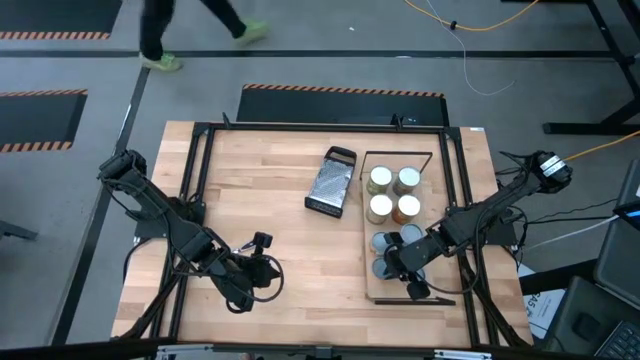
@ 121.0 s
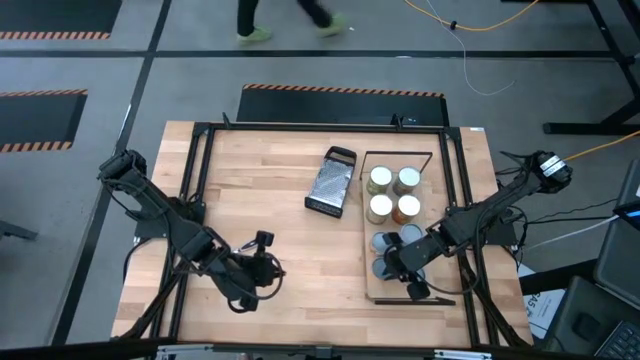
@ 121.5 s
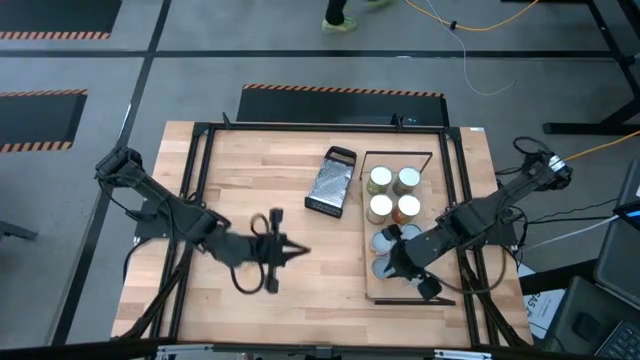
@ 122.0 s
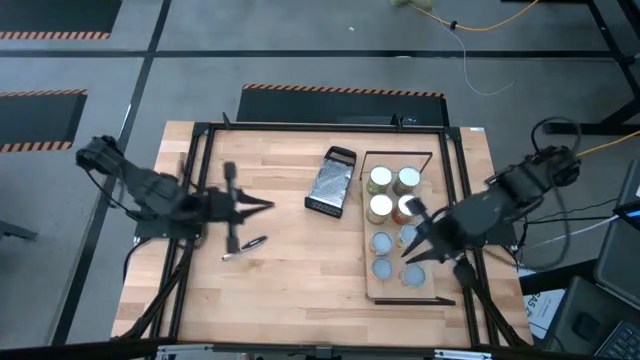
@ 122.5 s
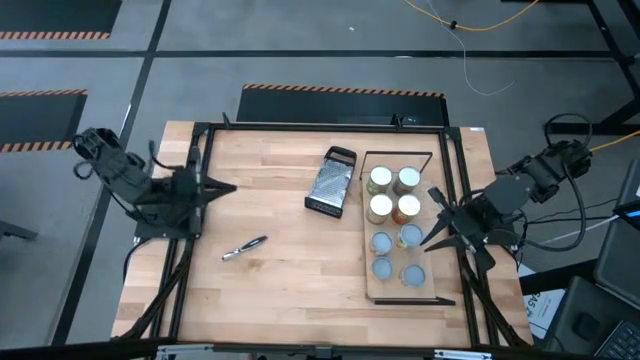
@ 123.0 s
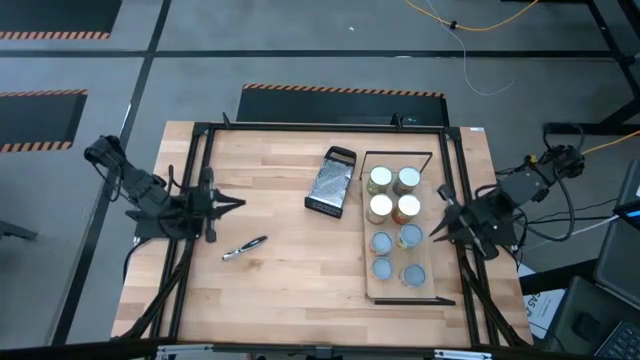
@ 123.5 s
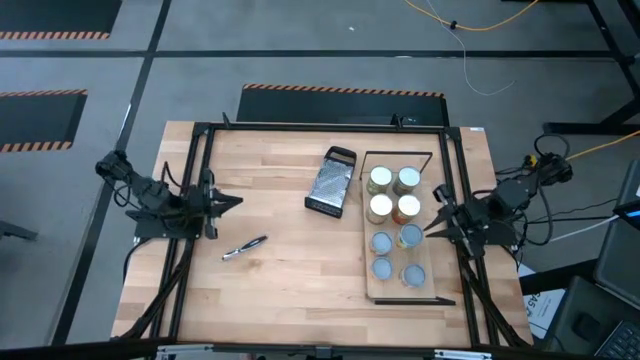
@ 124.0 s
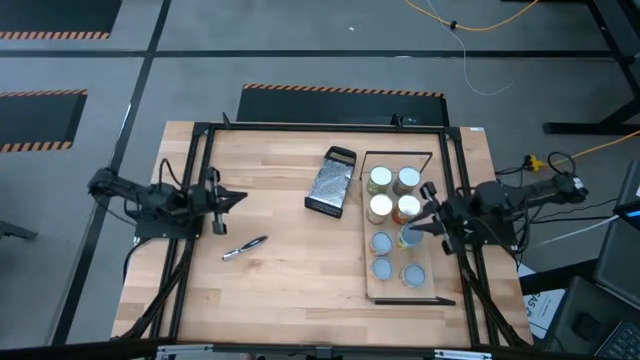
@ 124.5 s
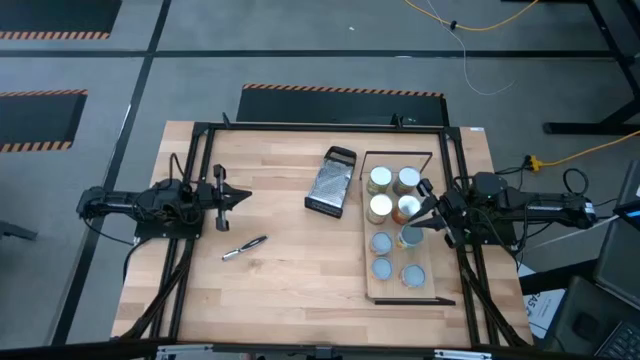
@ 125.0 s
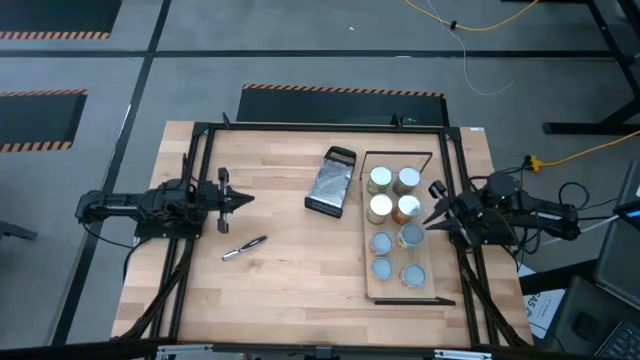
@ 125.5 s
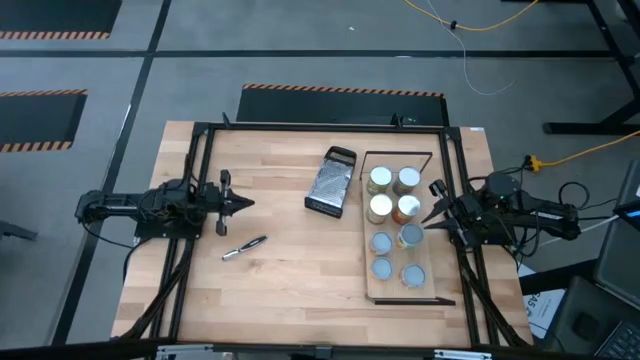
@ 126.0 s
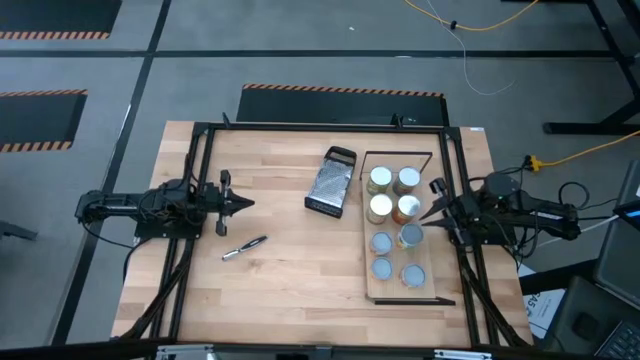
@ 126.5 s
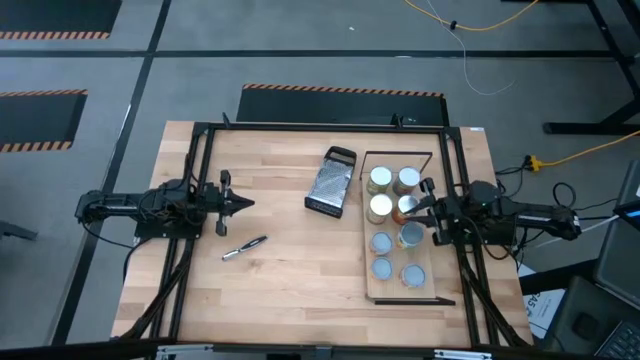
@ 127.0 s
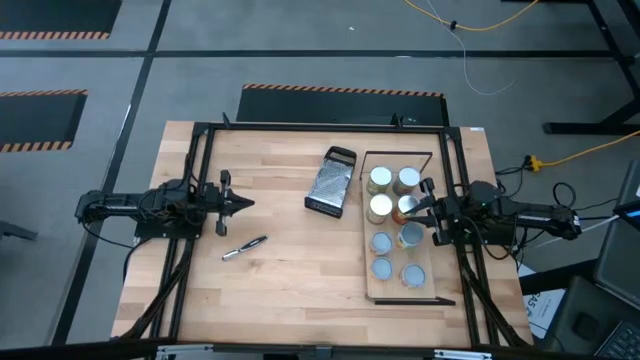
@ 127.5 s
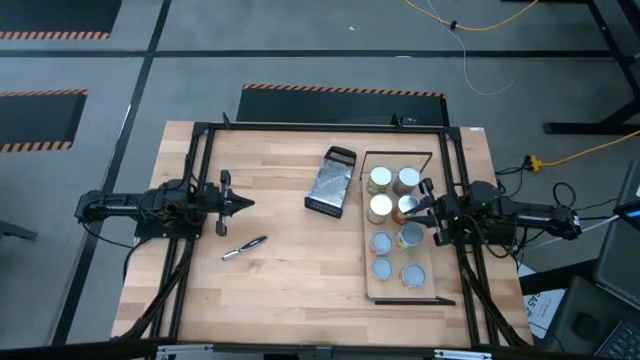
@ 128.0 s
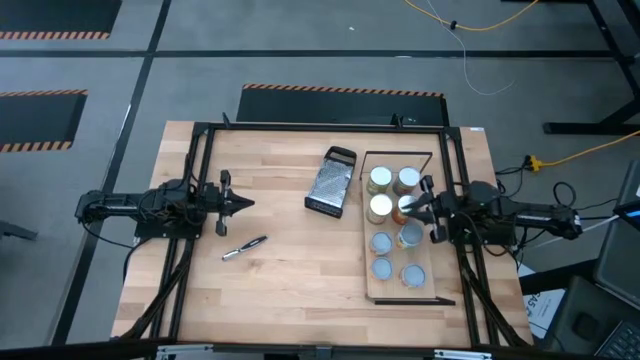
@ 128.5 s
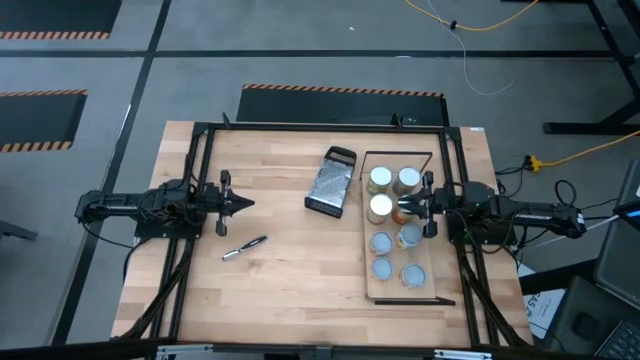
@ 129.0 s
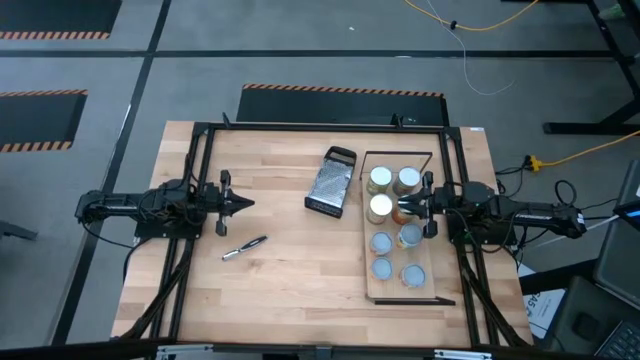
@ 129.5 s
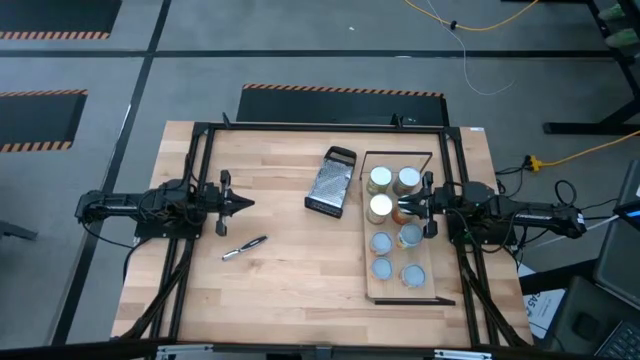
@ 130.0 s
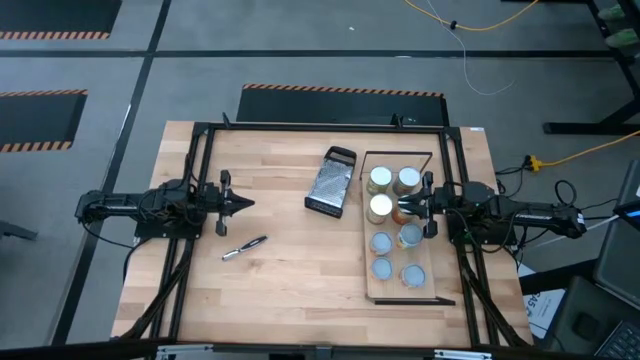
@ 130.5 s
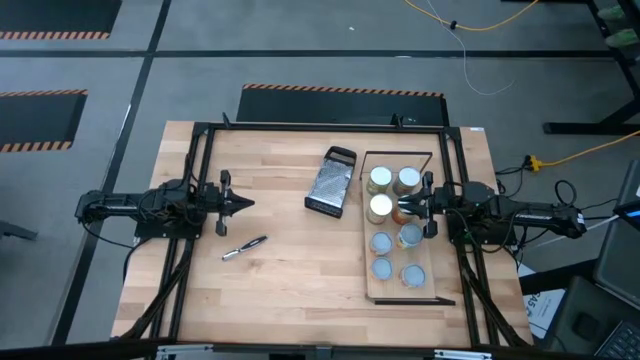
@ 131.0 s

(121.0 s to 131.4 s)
Task: Pick and place cans onto a shelf
Return to Home Position

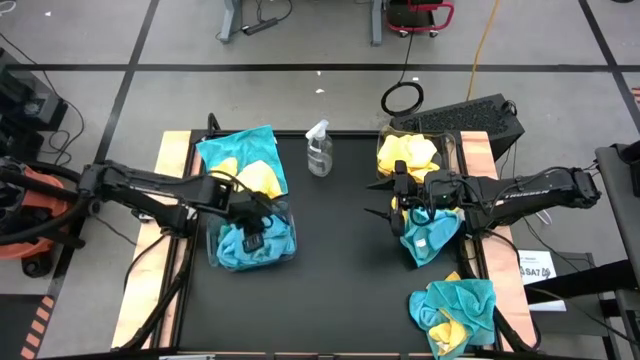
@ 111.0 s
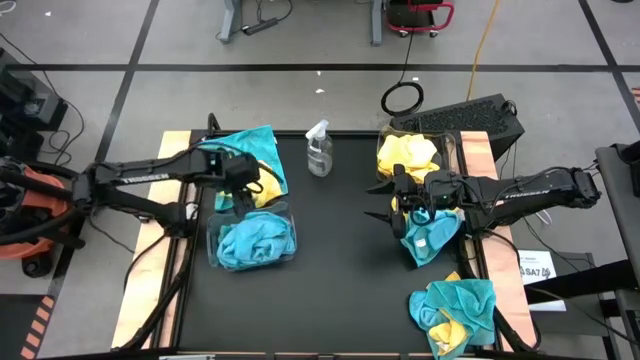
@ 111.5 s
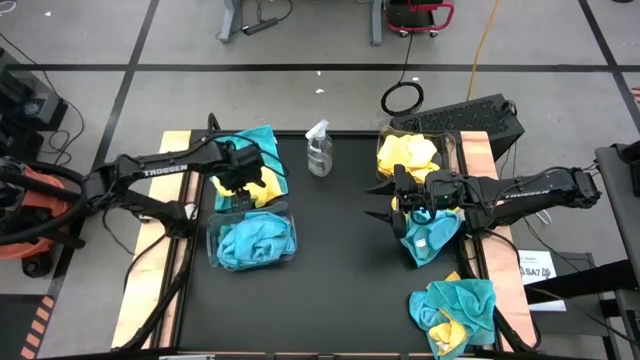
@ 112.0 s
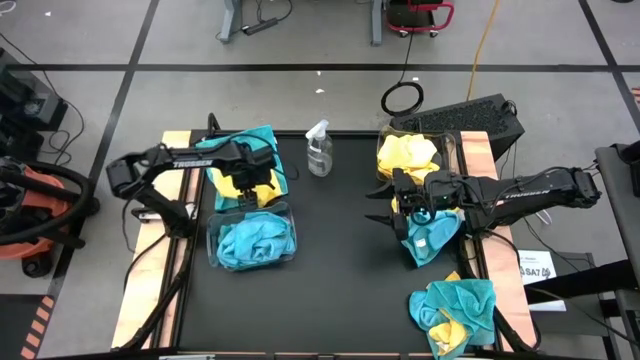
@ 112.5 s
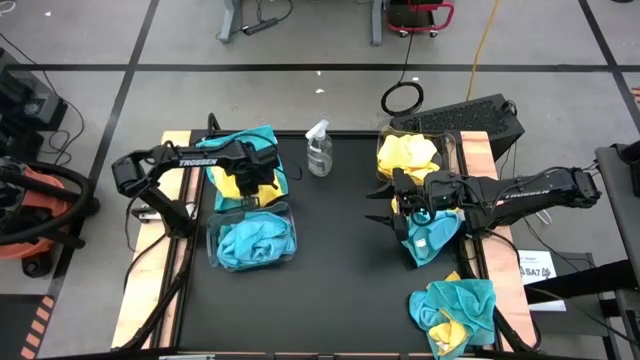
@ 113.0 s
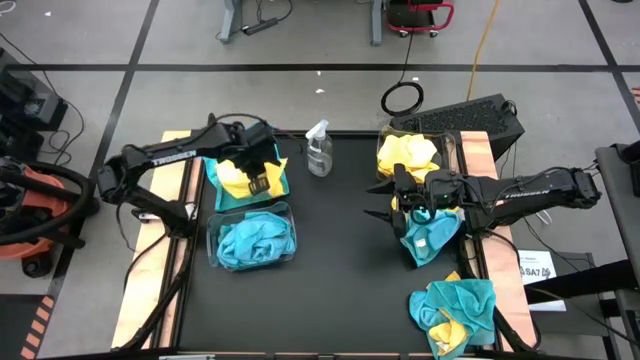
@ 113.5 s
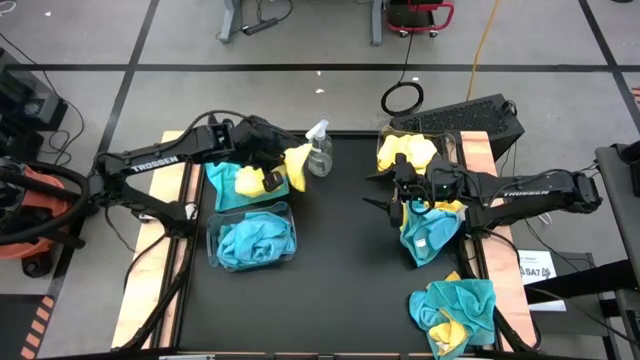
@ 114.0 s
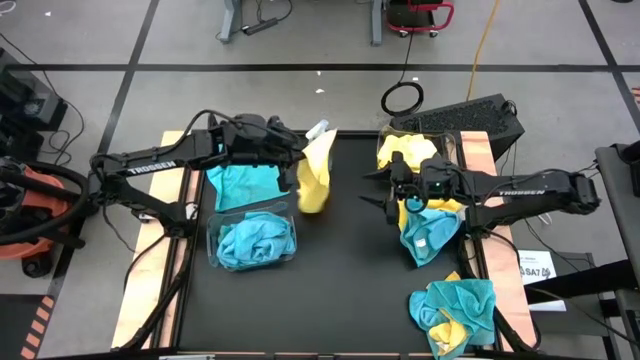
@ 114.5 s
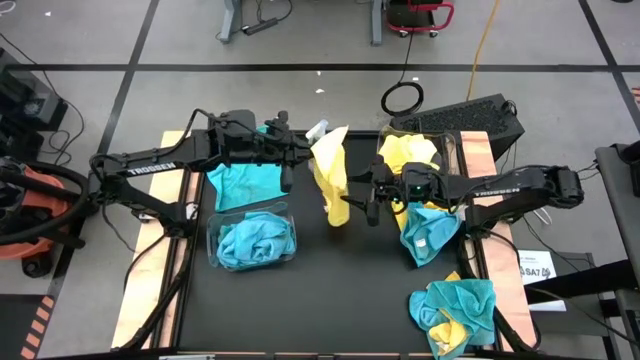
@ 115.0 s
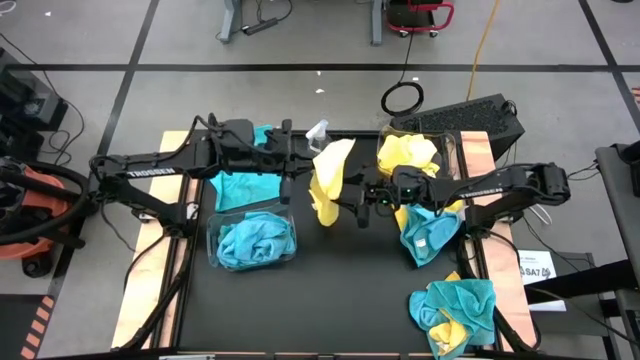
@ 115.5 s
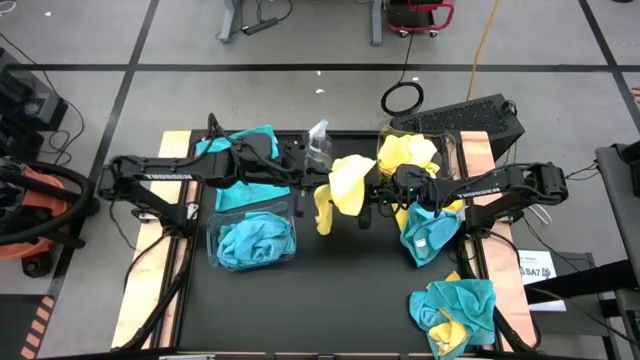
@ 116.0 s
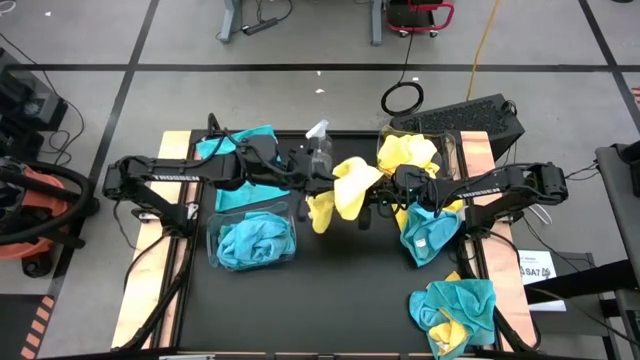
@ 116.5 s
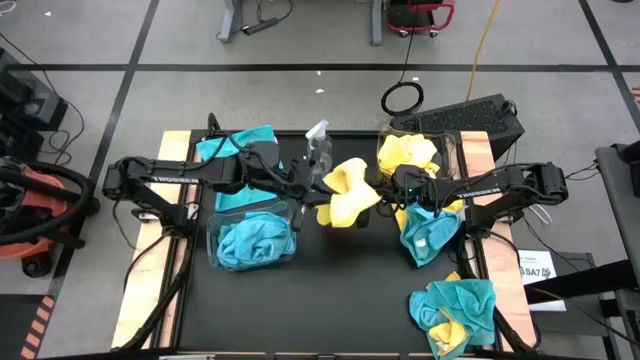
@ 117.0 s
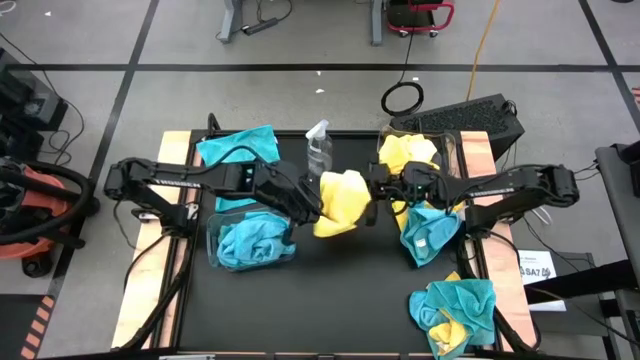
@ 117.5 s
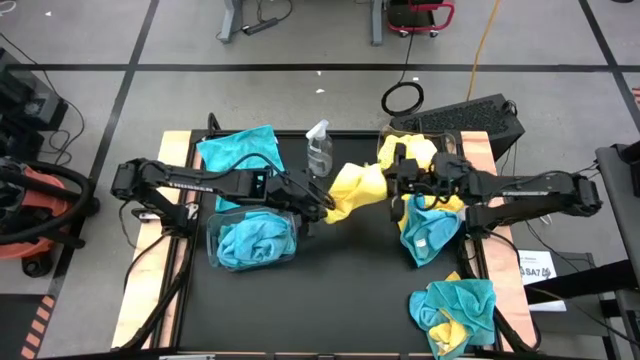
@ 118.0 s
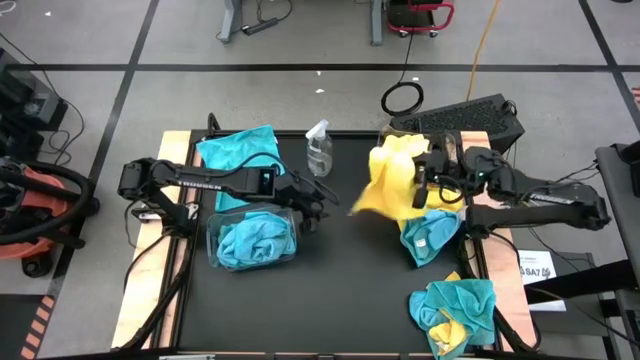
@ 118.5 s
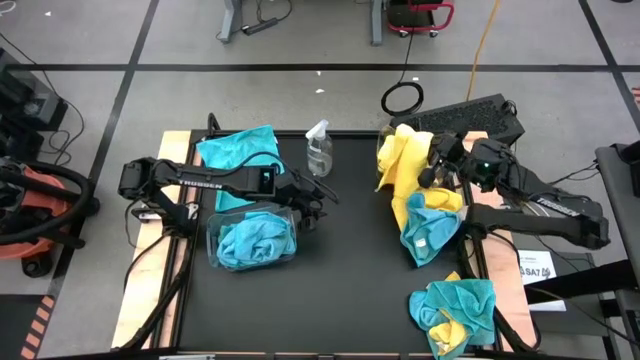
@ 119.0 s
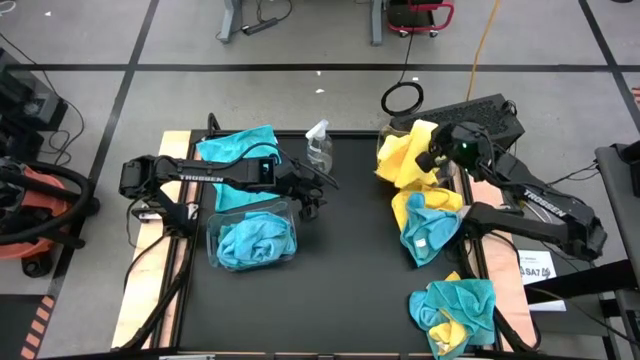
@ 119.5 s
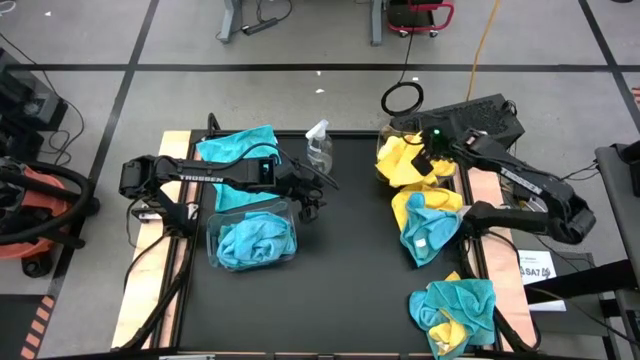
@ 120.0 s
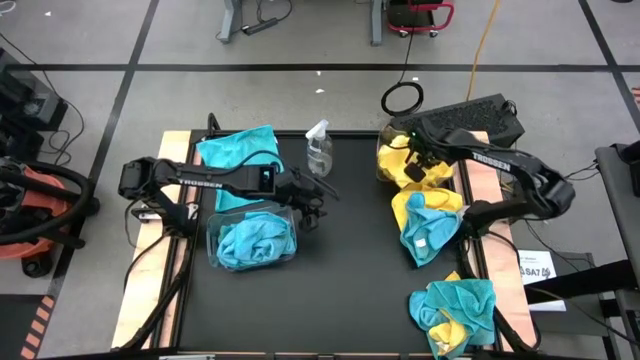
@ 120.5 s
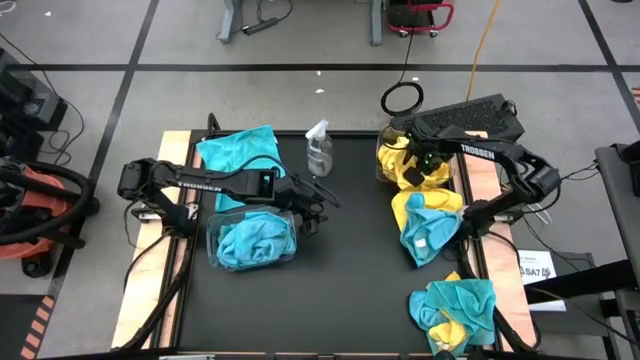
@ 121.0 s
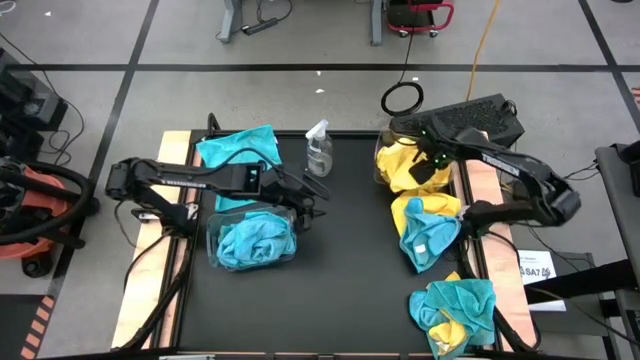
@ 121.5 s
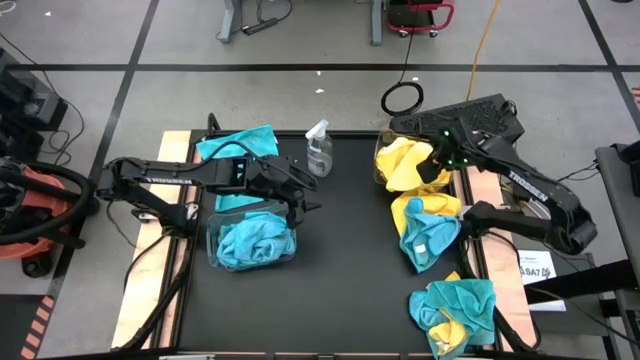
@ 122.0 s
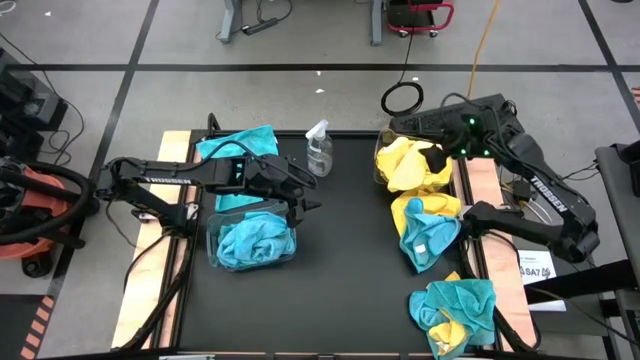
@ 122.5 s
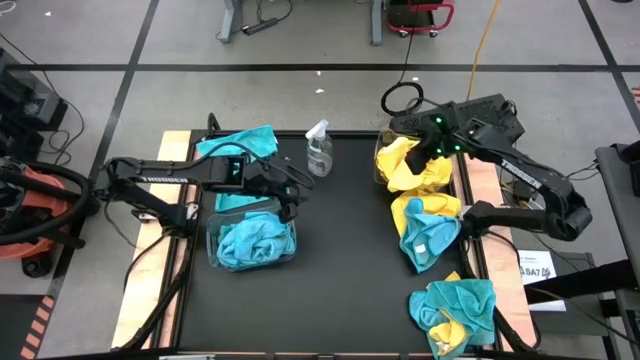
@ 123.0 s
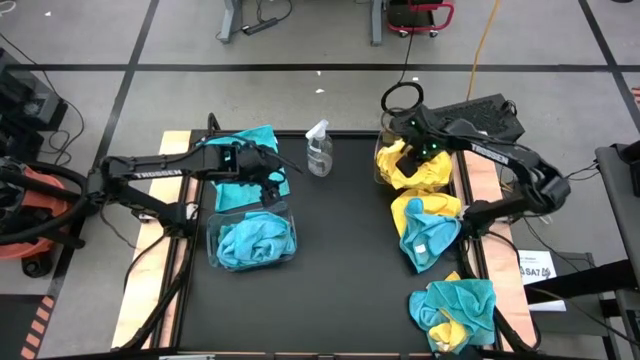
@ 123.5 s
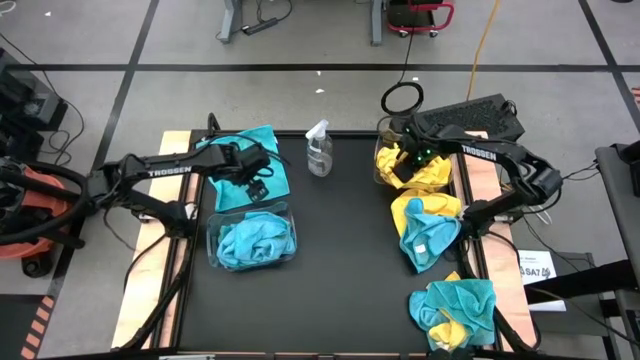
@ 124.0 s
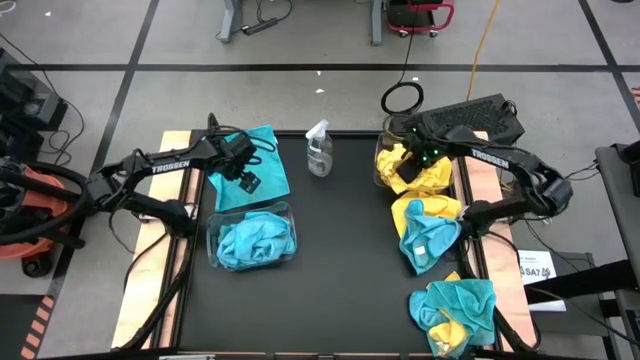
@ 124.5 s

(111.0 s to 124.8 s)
Task: Sort microfiber towel by color & place in baskets
Put the yellow towel into the top transparent bin
